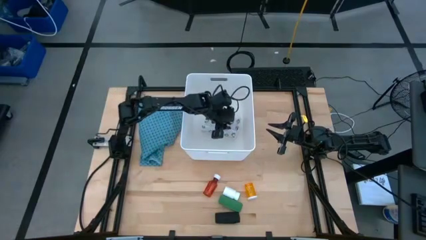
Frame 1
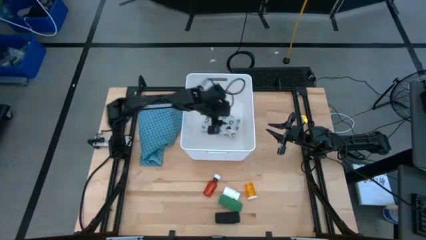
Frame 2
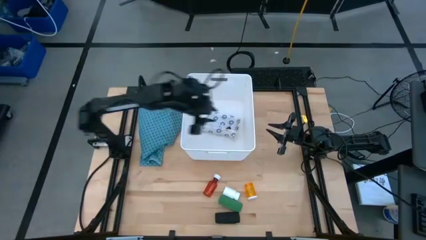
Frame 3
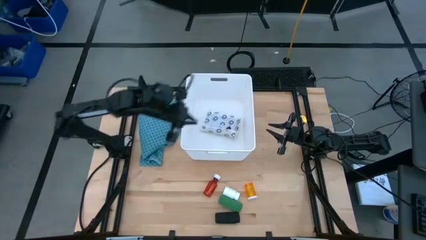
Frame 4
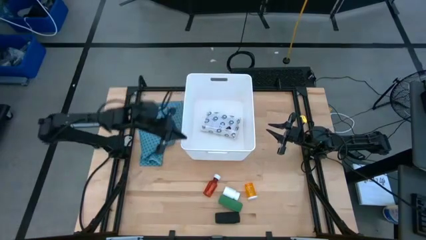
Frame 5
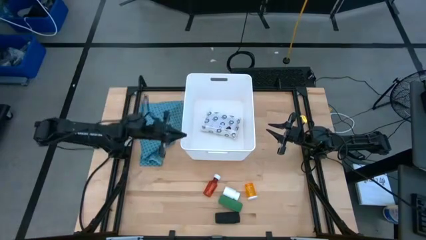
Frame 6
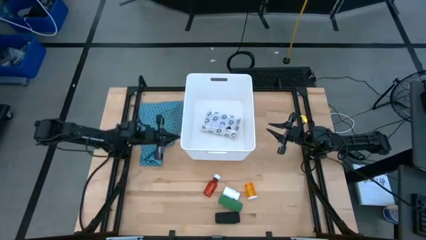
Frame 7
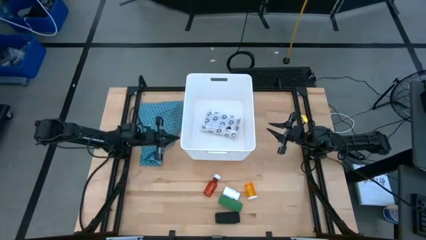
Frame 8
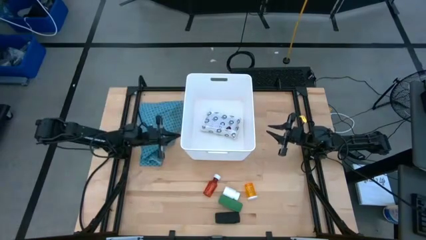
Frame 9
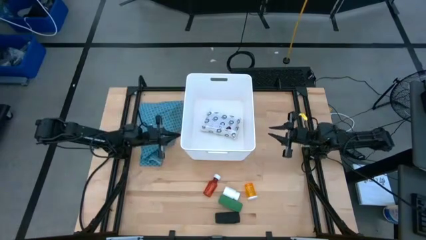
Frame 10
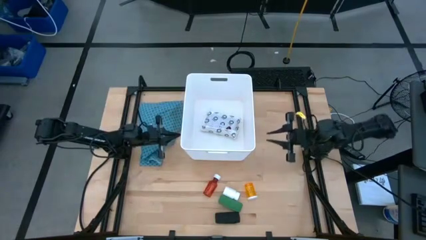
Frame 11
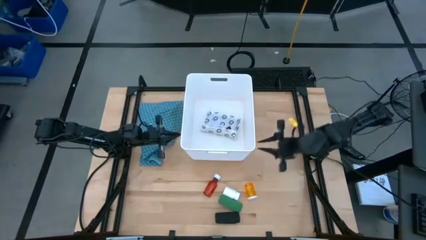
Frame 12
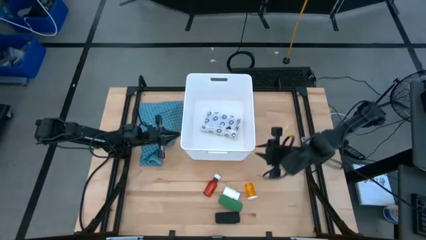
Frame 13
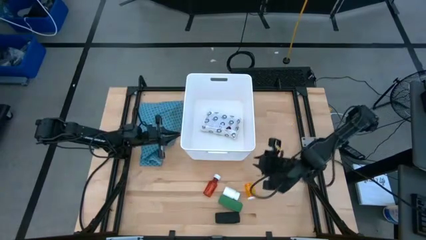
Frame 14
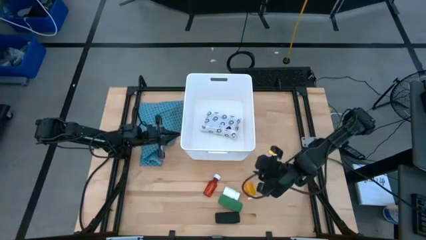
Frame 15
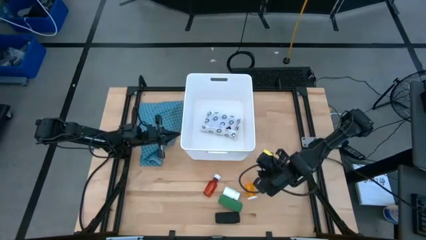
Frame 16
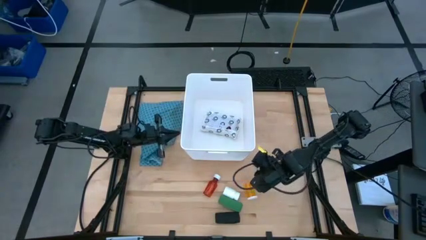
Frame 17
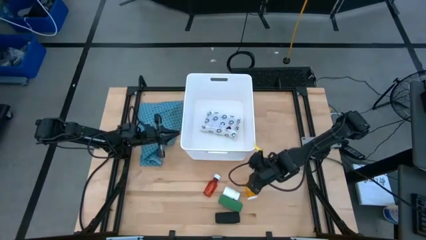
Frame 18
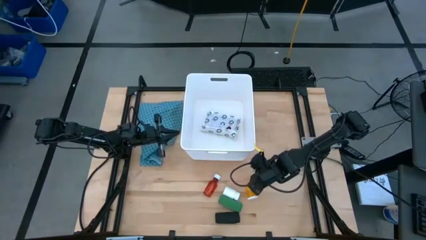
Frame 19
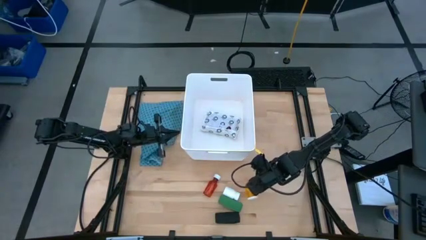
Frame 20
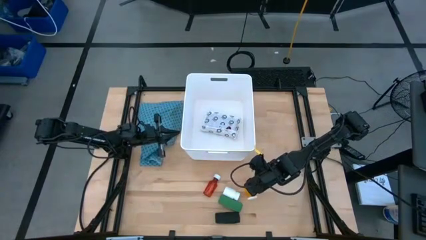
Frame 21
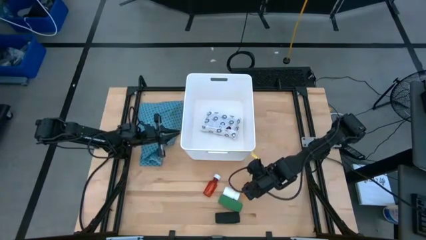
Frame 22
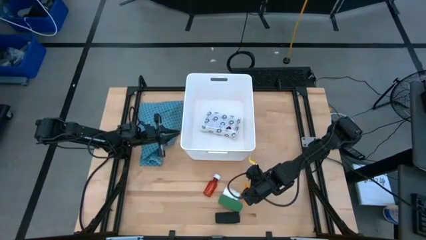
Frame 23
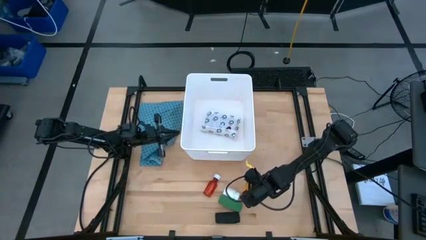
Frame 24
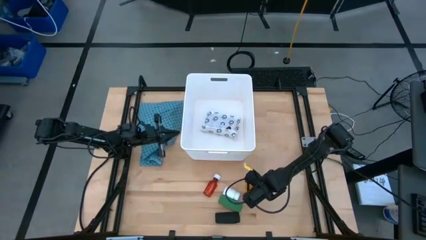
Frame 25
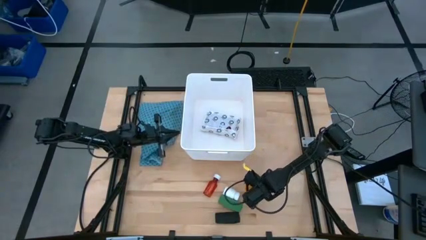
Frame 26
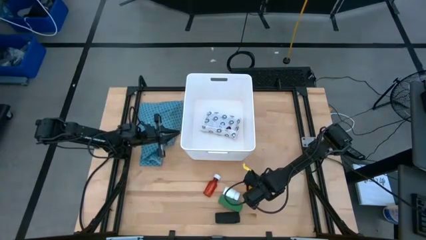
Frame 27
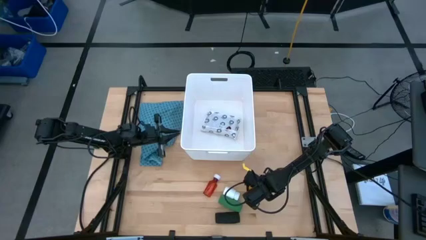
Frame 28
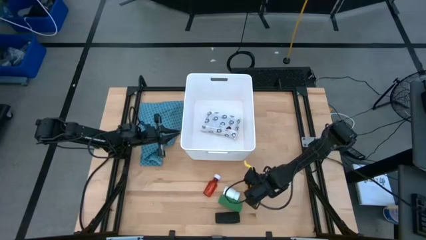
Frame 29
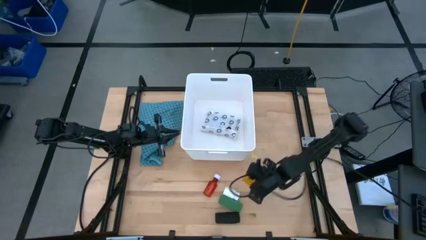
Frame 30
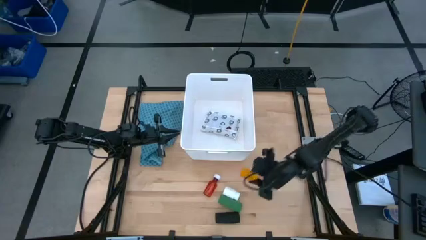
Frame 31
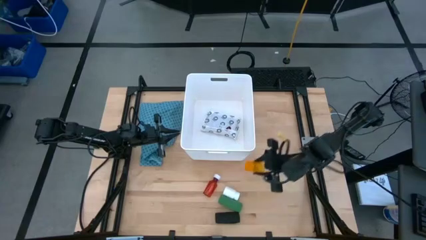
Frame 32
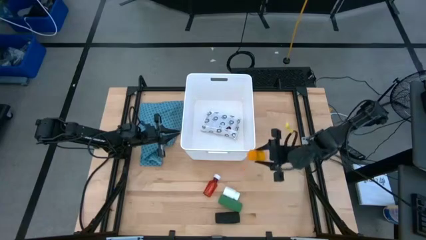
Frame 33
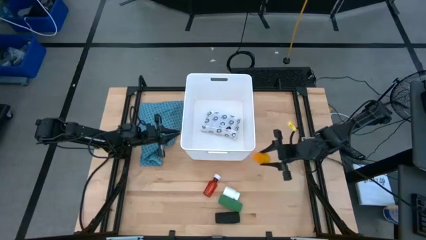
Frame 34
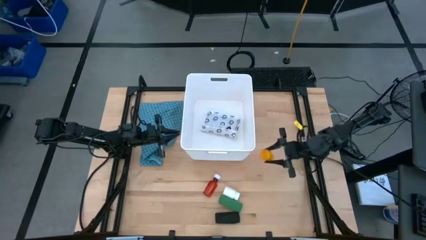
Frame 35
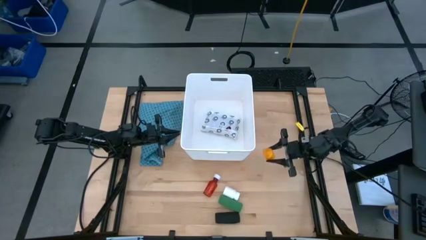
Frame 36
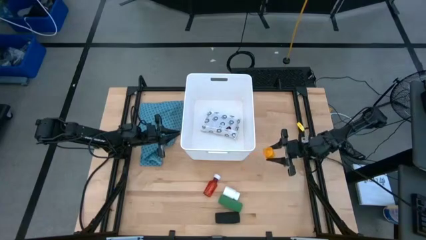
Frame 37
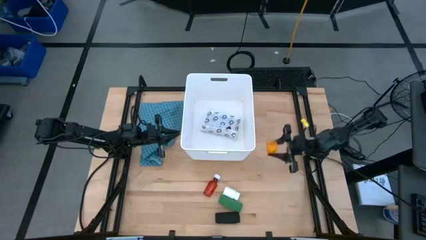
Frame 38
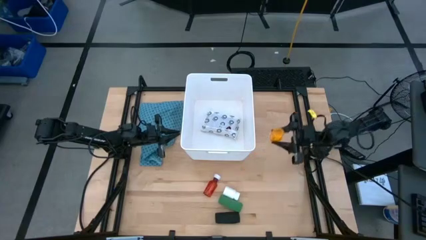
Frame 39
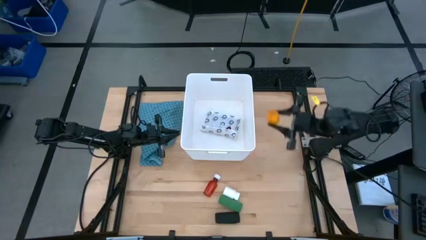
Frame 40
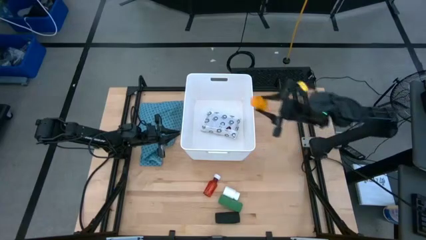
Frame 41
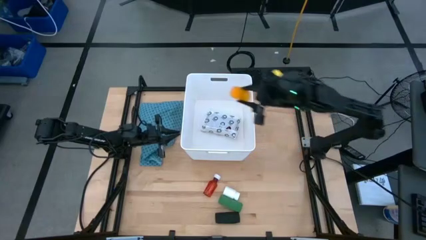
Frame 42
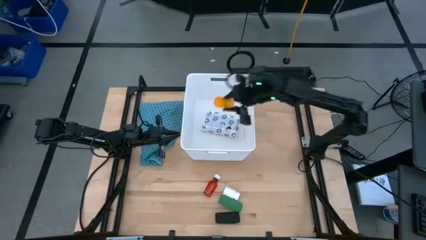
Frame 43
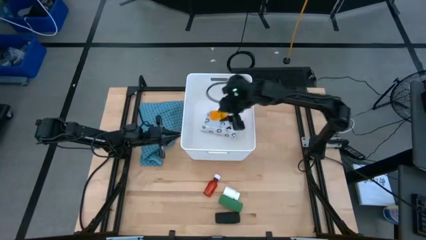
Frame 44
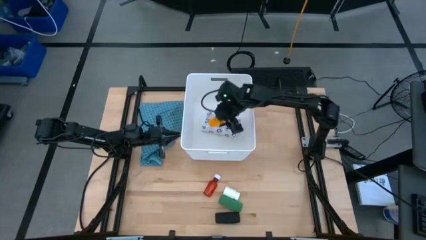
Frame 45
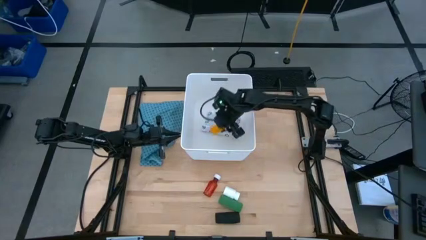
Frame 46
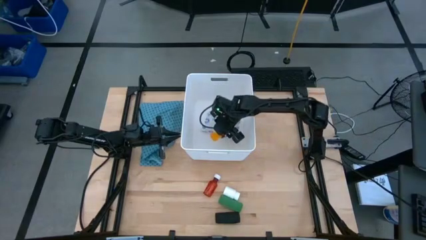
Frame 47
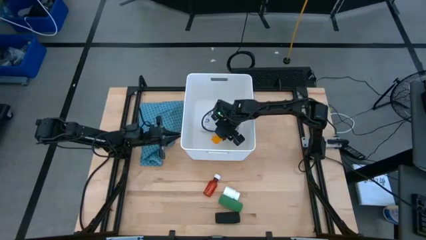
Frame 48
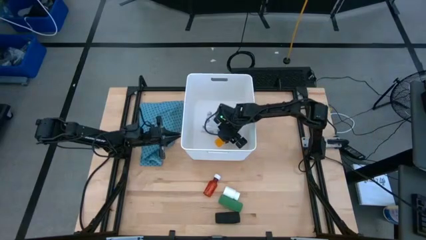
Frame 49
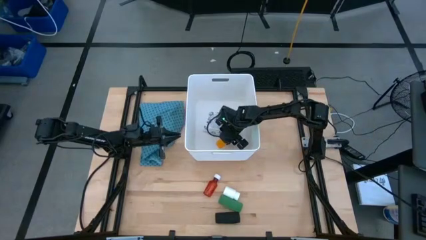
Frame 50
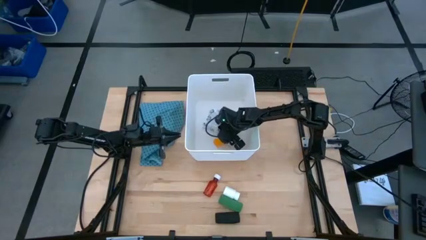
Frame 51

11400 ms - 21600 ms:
Task: Pick & place medical supplies in basket/bin
Put the orange pill bottle in the white bin

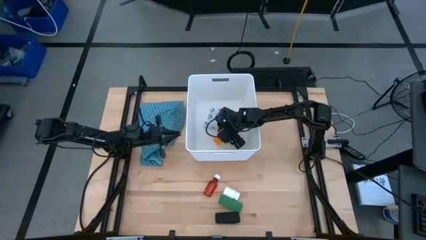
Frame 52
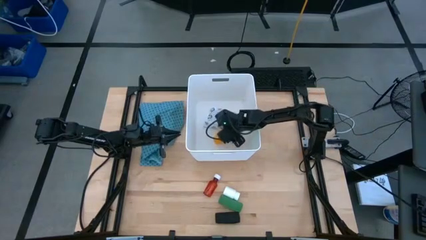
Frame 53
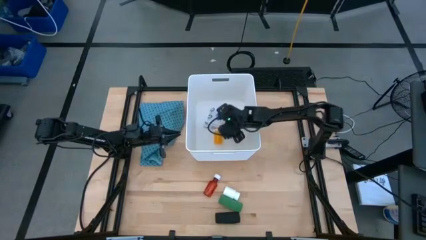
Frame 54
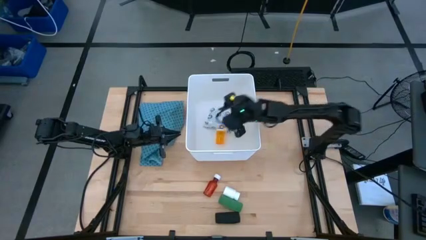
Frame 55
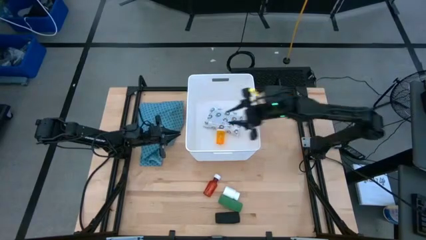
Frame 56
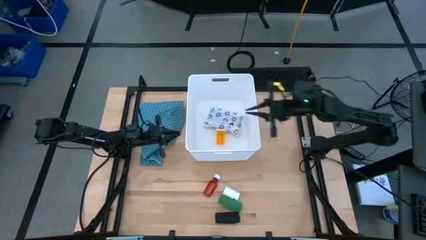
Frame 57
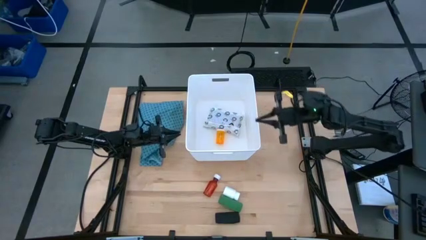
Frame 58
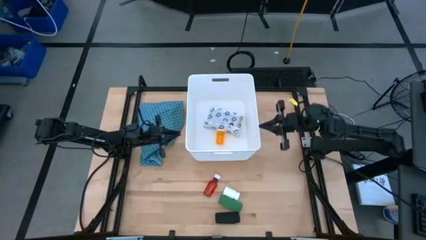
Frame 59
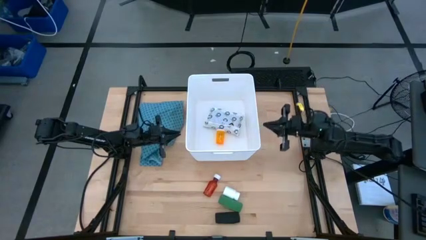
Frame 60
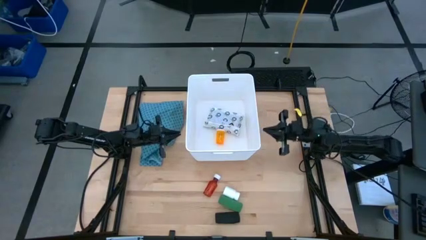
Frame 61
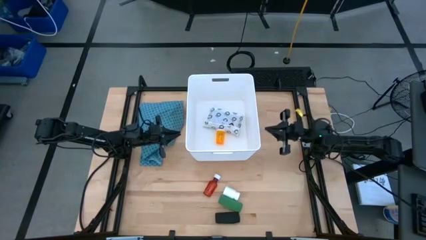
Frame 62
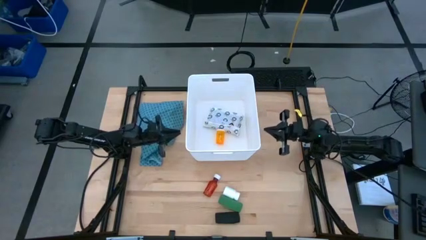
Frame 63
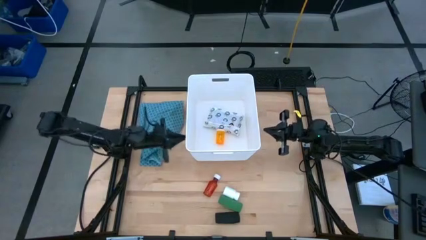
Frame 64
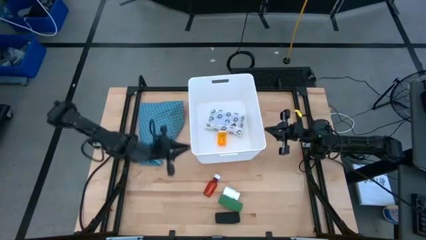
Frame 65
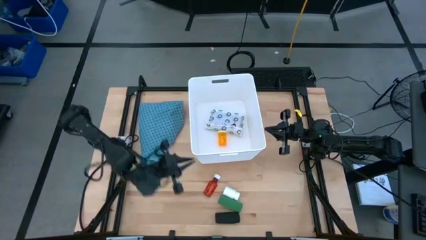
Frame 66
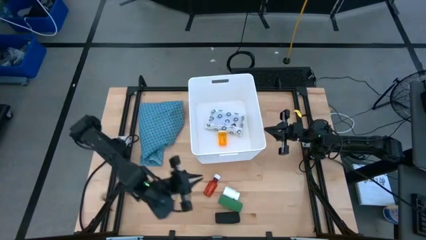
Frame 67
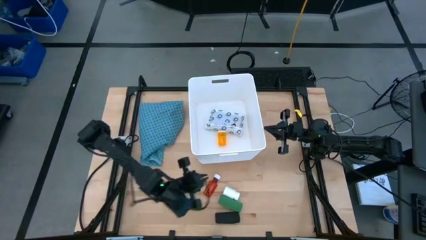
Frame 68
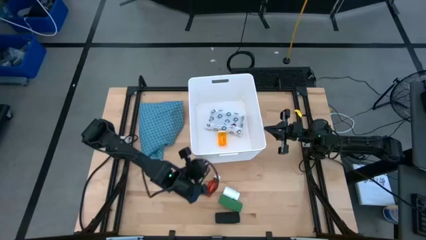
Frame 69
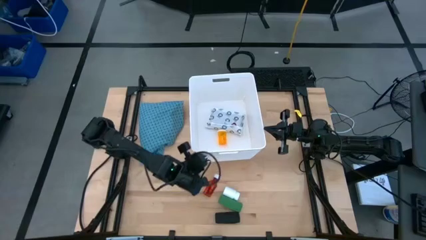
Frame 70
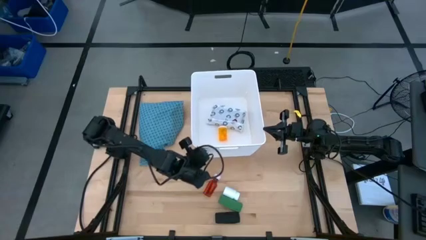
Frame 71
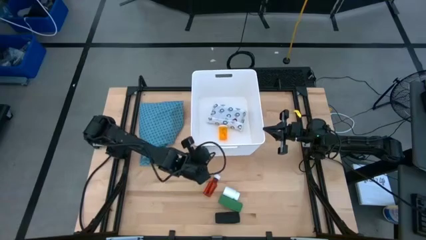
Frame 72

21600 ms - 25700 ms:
Adjust the white bin

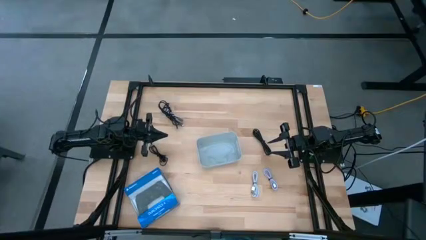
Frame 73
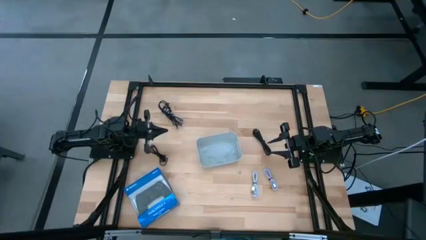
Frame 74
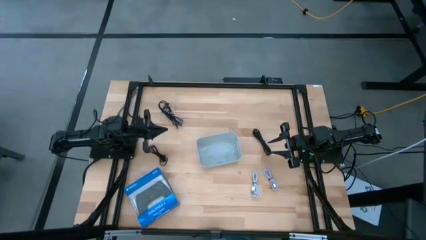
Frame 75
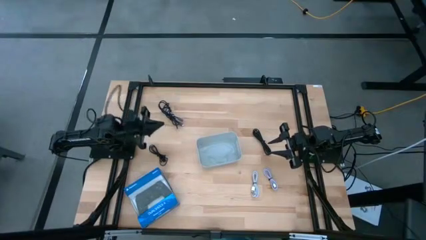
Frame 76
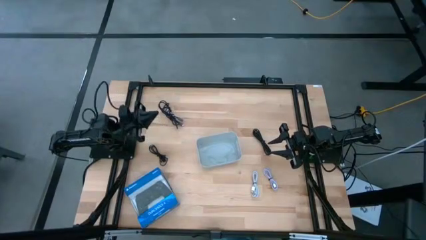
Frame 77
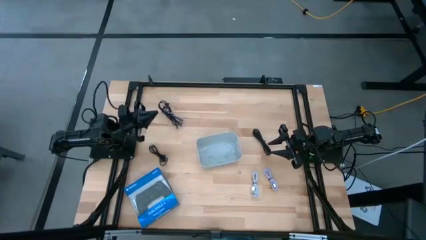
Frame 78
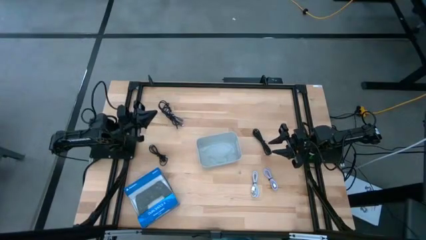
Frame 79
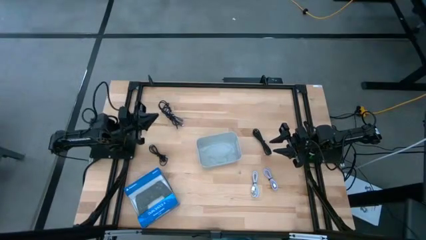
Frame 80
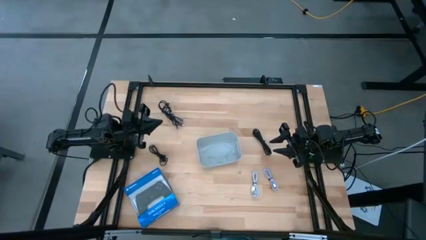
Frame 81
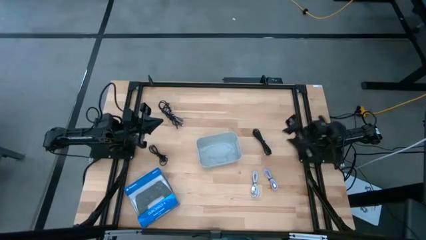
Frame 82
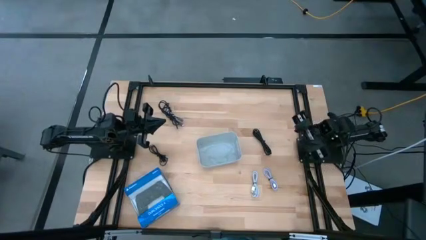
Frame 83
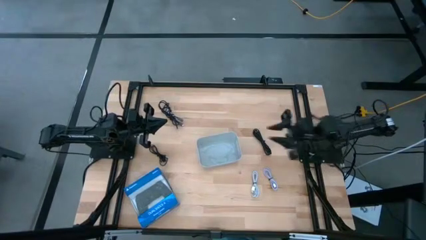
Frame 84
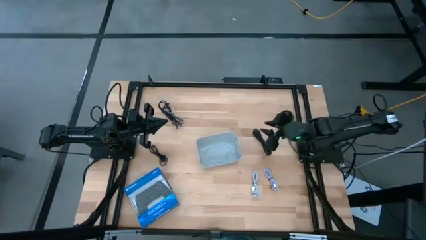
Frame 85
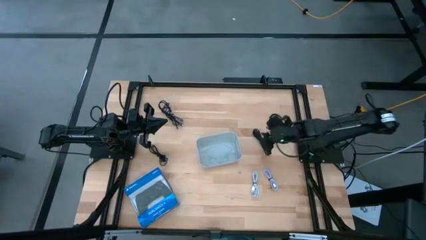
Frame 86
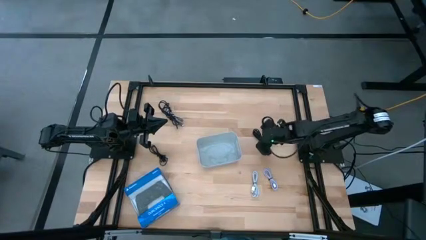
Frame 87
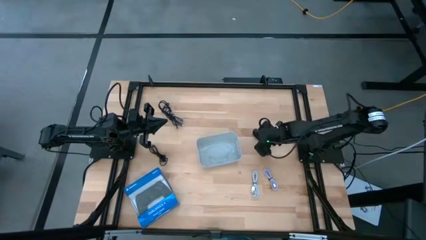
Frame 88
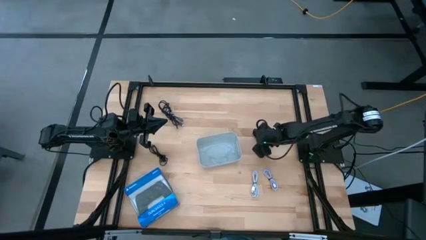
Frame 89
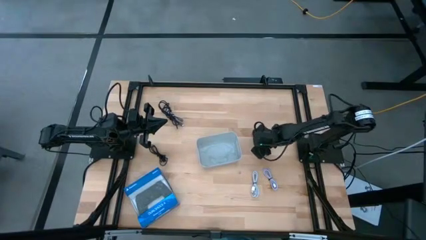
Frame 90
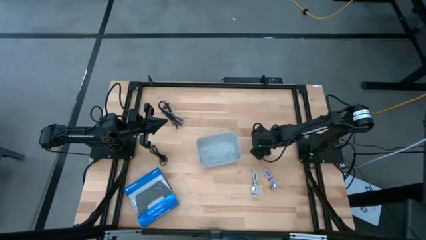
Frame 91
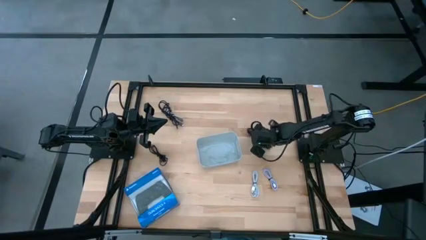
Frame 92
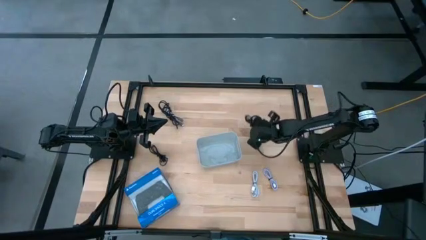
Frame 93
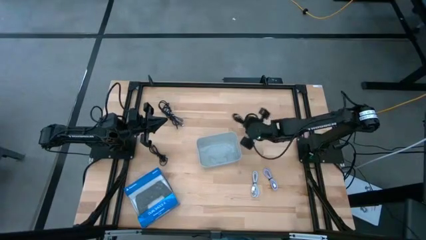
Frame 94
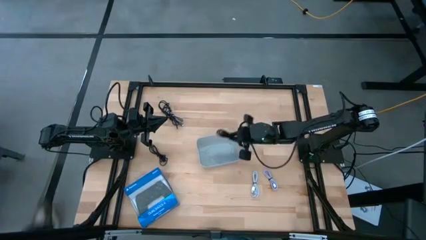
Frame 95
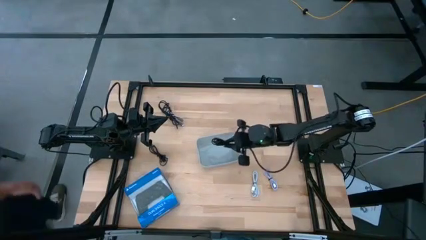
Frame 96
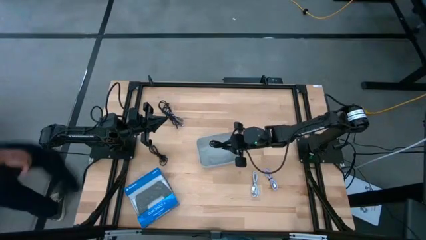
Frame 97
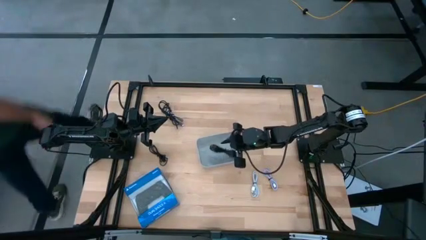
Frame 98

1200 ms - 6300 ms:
Task: Pick and place USB-C Cables
Put the right black charger cable into the gray bin
